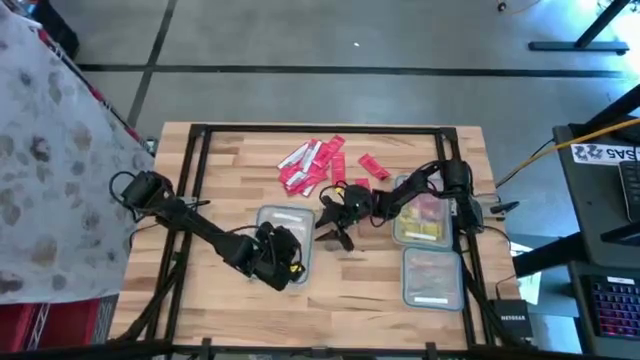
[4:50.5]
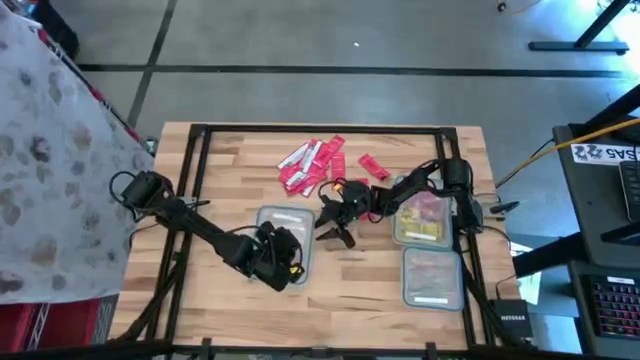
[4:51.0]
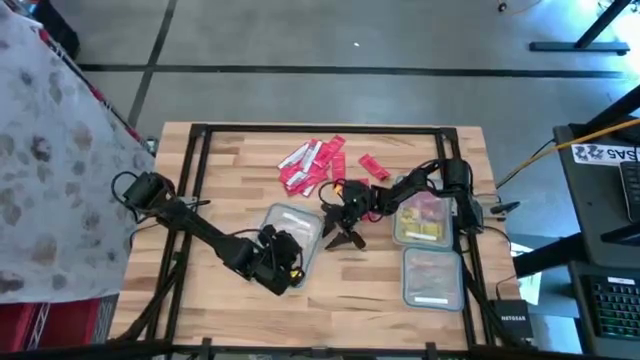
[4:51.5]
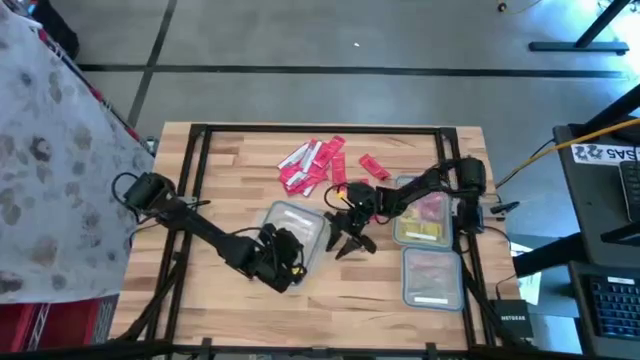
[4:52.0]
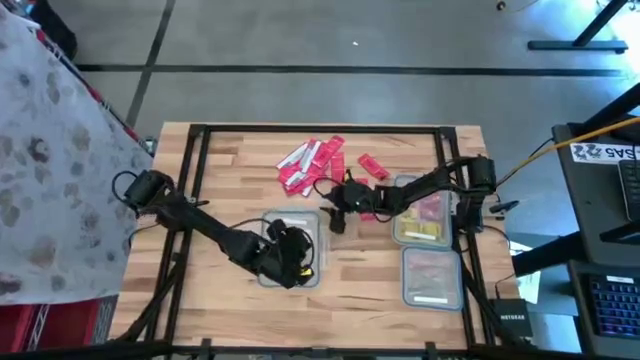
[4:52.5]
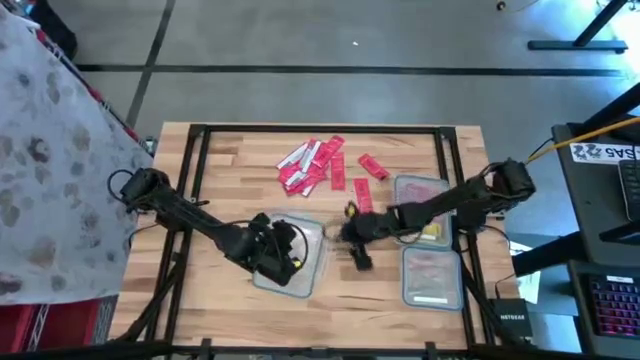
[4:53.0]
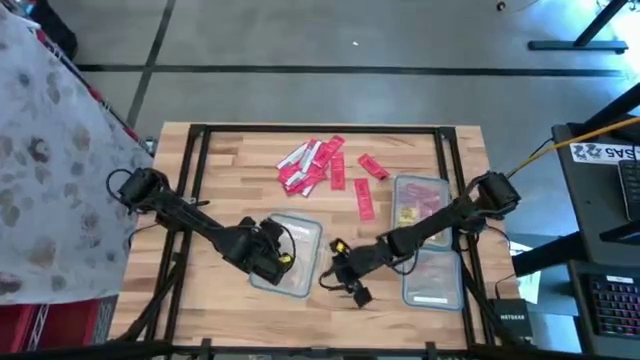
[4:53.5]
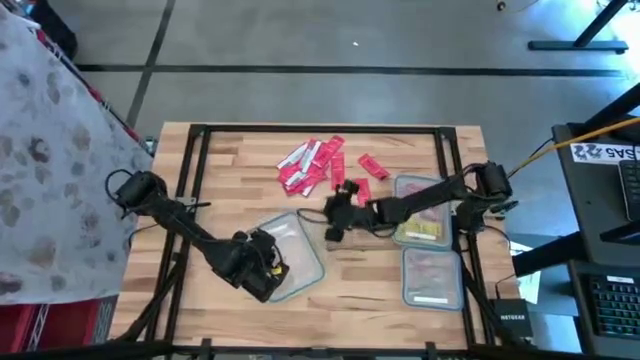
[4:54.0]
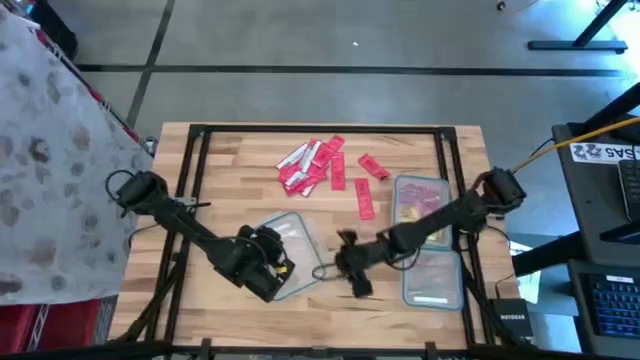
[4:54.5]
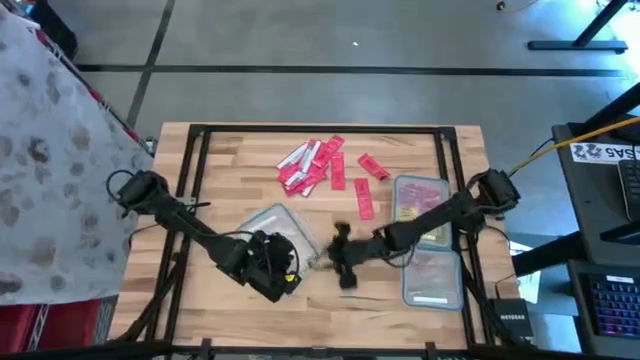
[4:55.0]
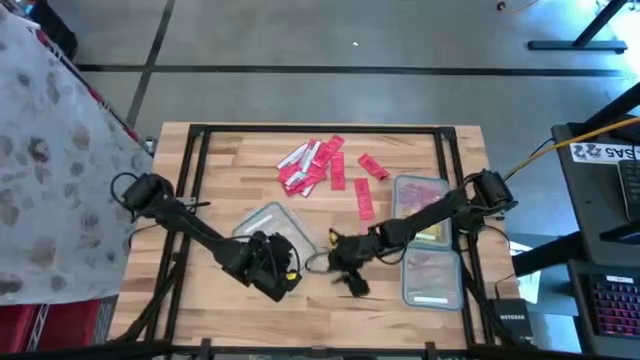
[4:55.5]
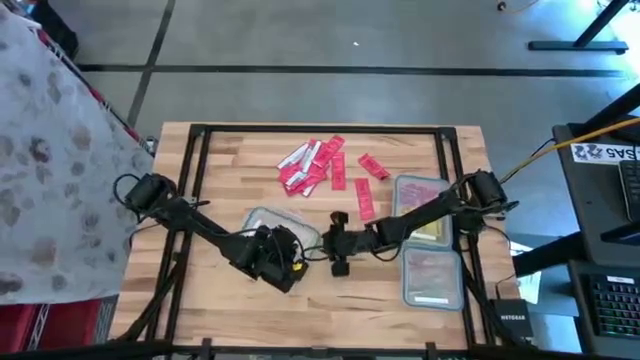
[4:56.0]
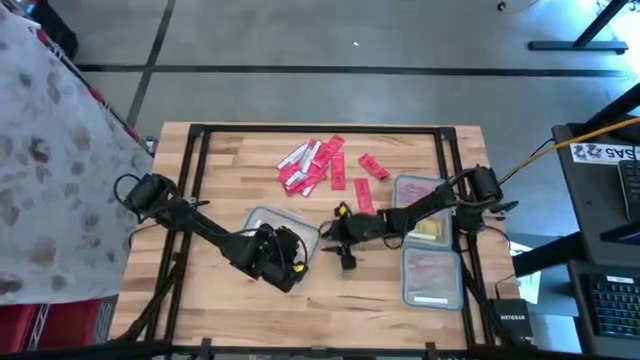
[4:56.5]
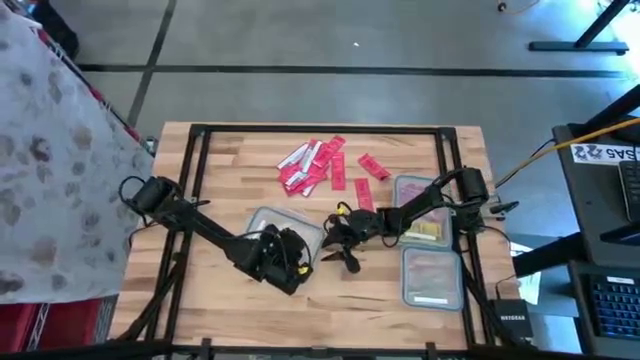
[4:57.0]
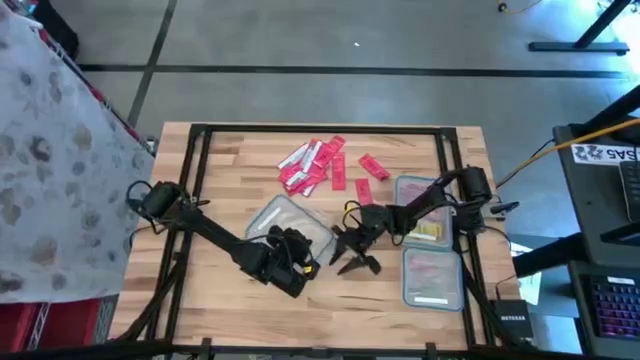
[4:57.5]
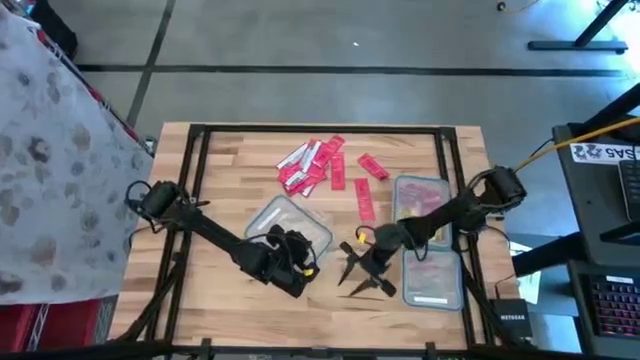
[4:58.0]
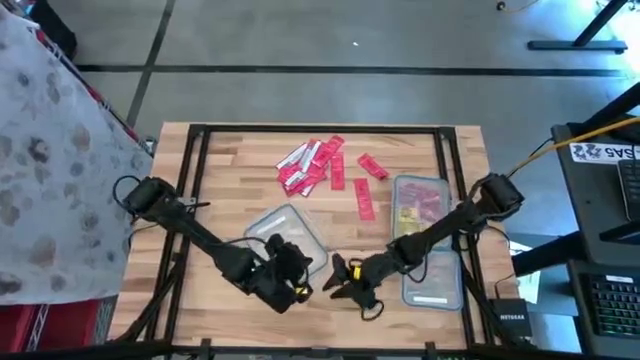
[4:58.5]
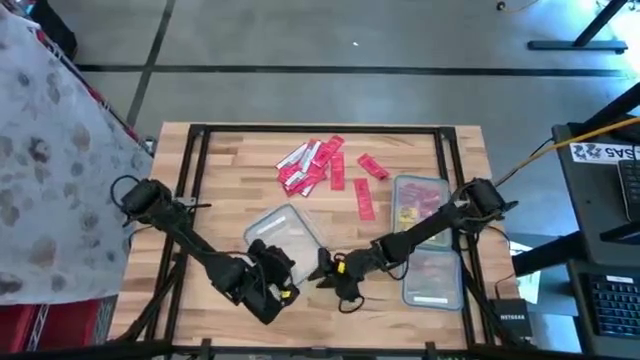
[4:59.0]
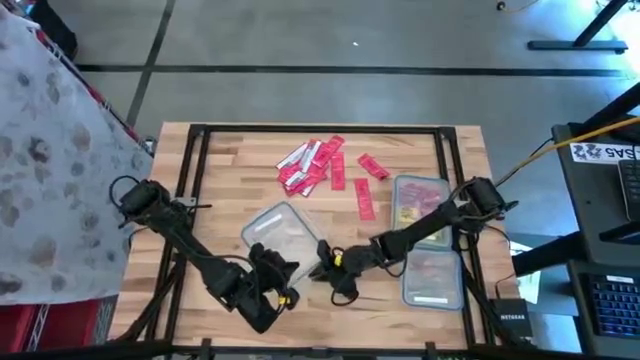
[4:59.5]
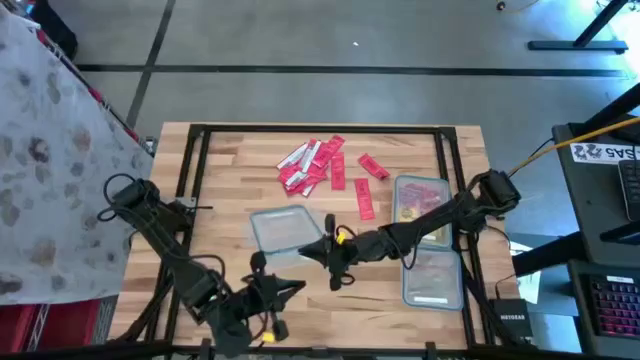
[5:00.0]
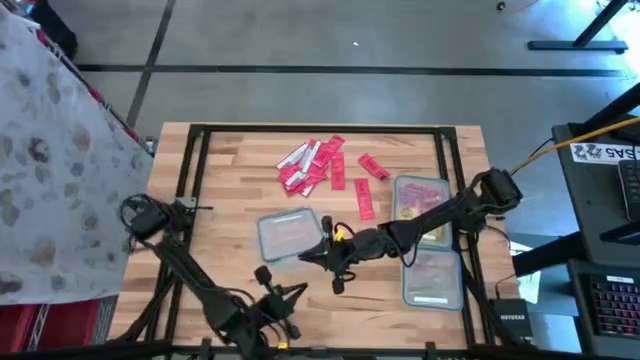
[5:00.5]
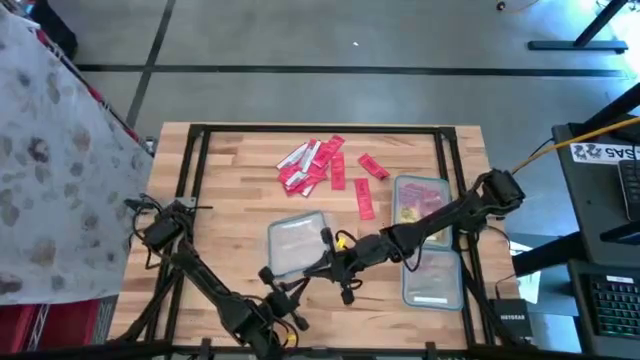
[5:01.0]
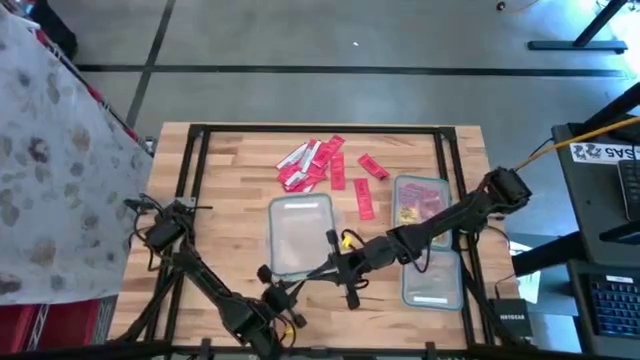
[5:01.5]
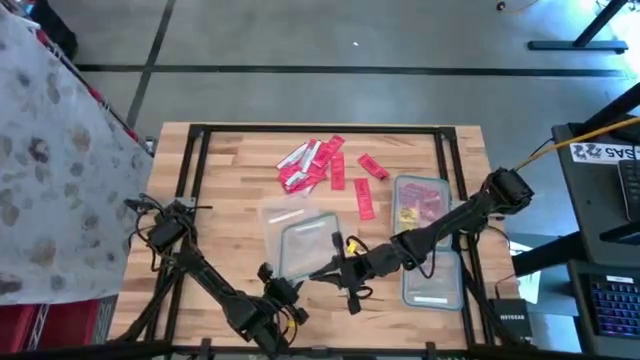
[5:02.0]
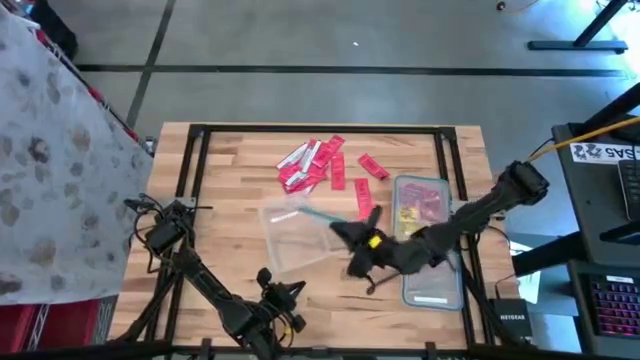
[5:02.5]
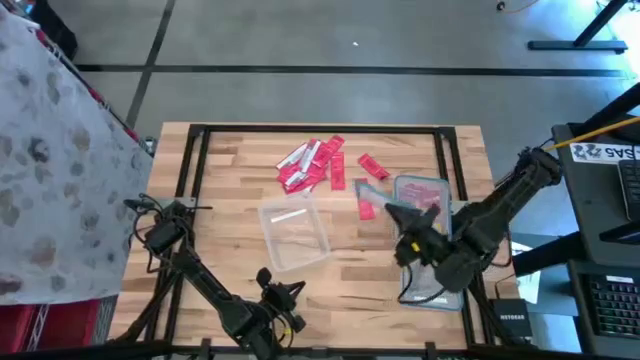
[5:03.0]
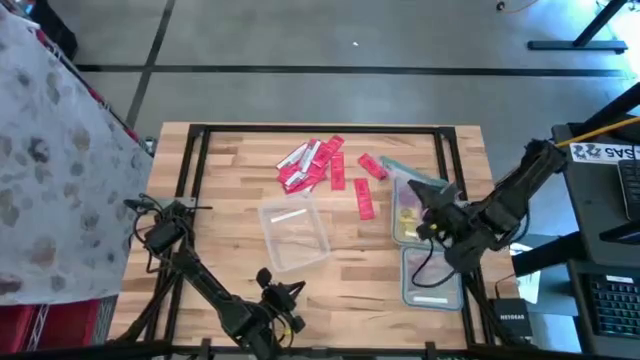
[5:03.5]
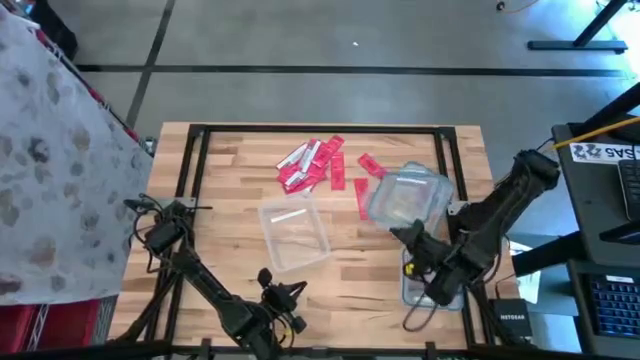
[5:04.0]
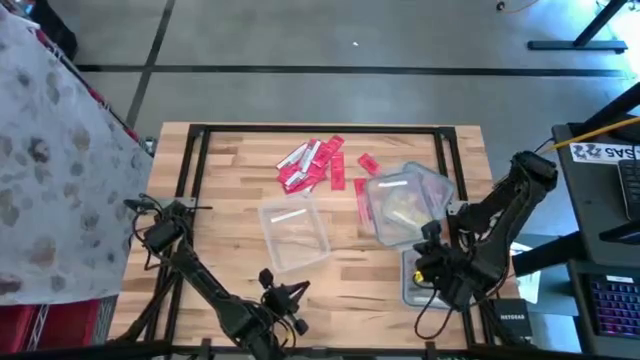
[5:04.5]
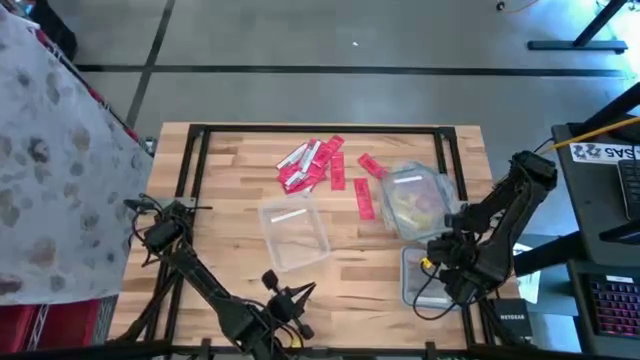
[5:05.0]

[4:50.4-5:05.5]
Task: Sort candy
Open the left transparent bin

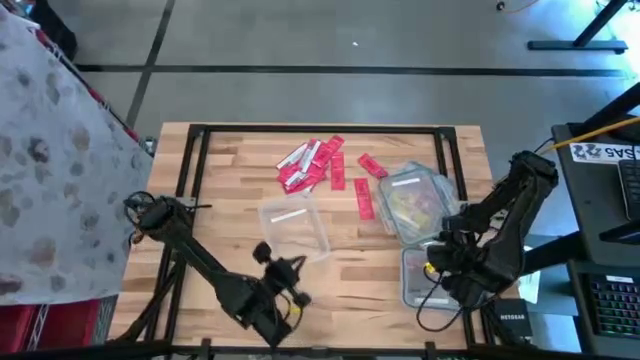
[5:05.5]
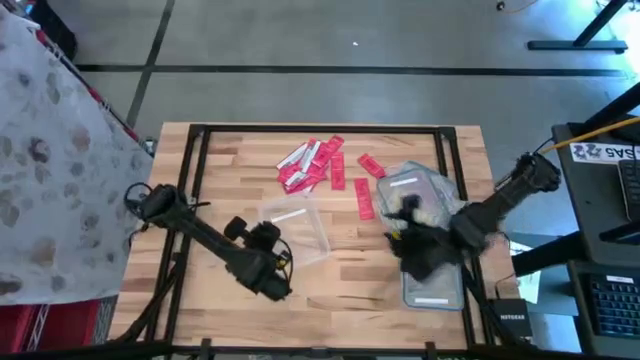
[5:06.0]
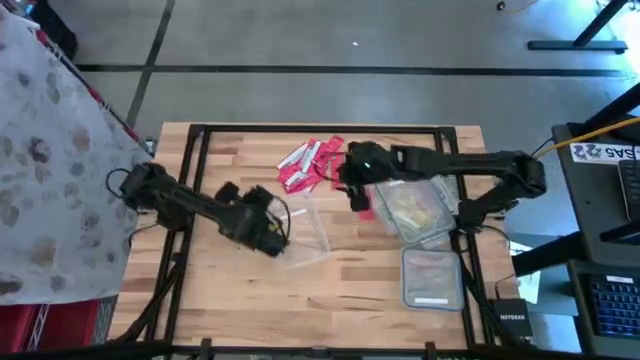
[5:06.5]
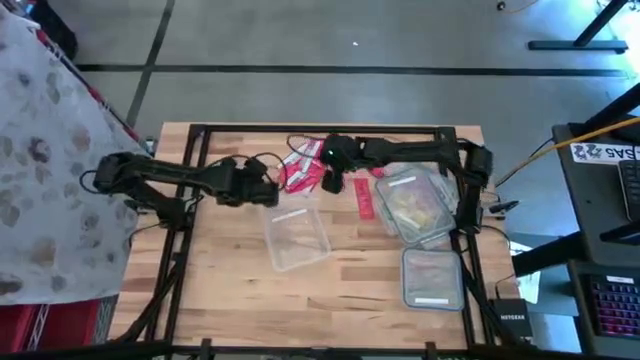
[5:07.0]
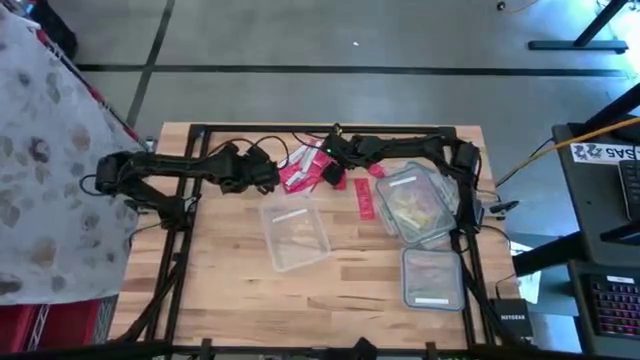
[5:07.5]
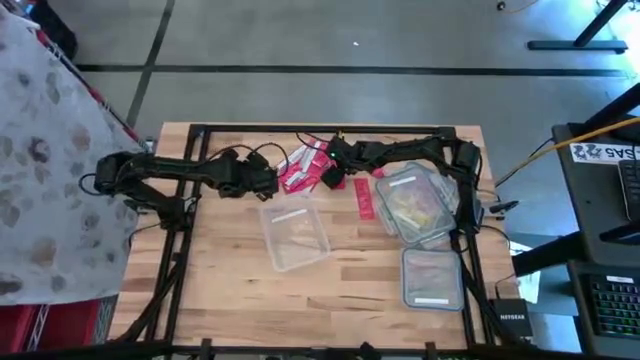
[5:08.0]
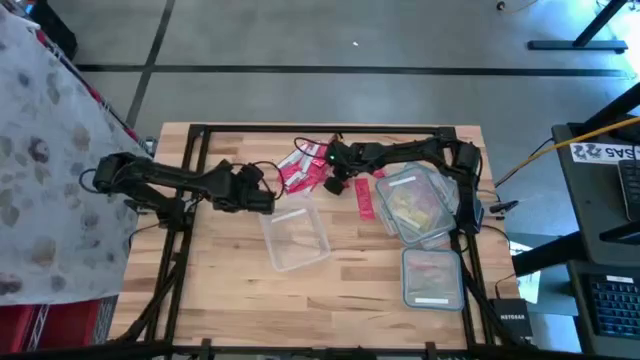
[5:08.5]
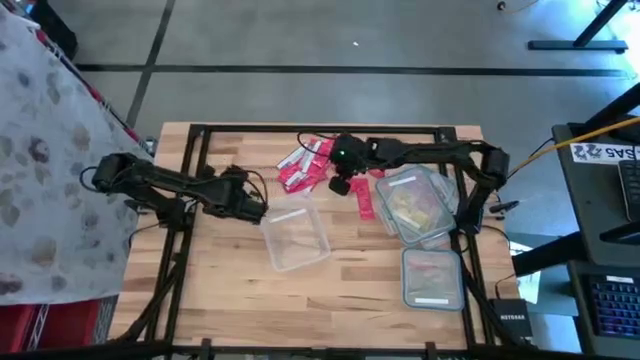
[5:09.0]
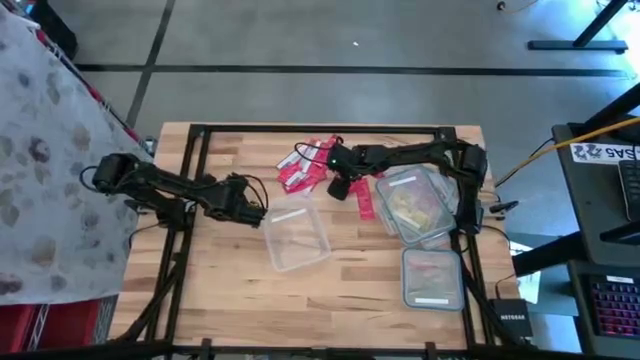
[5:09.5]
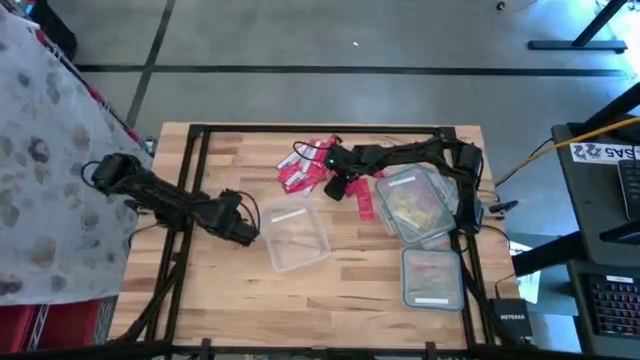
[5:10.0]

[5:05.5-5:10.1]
Put the pink candy strip into the left transparent bin

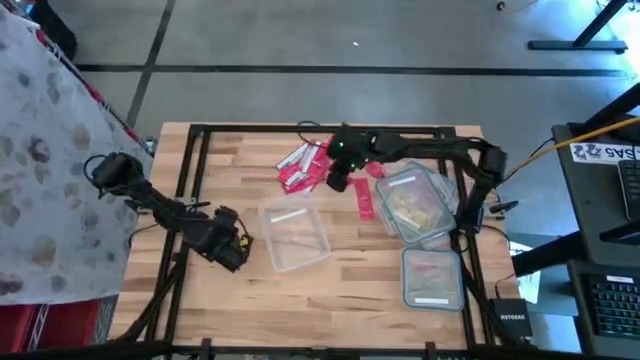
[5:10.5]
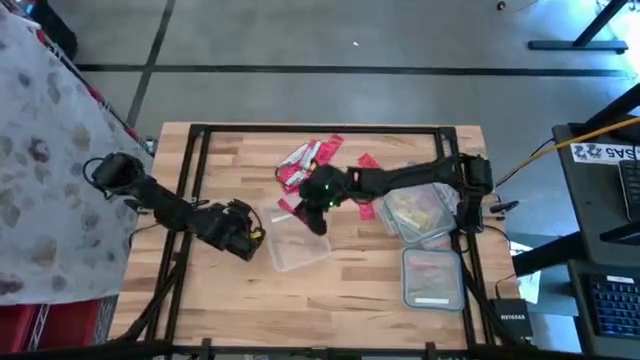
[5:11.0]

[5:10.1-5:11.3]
Put the pink candy strip into the left transparent bin

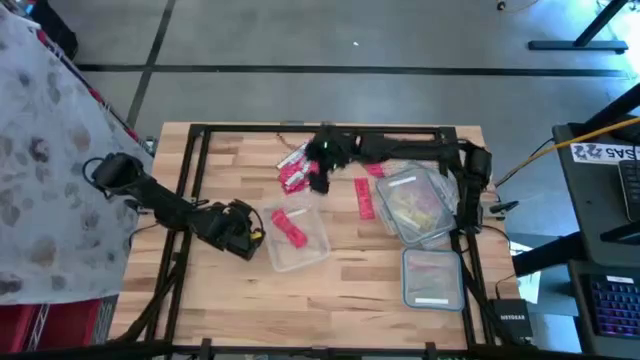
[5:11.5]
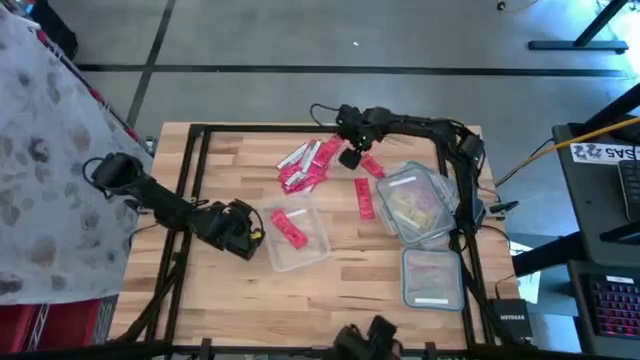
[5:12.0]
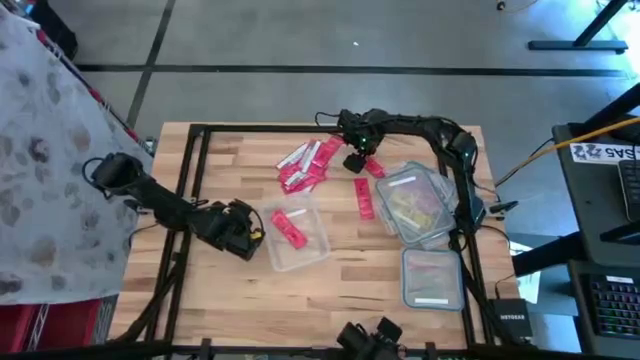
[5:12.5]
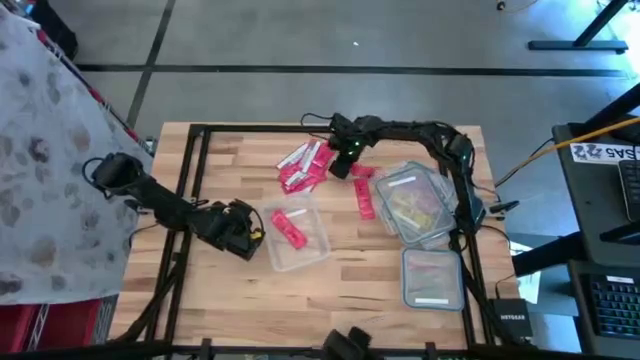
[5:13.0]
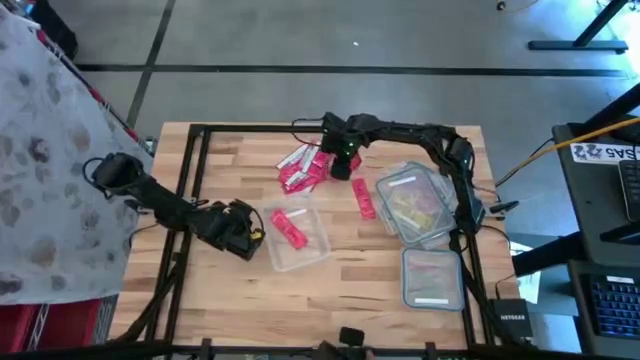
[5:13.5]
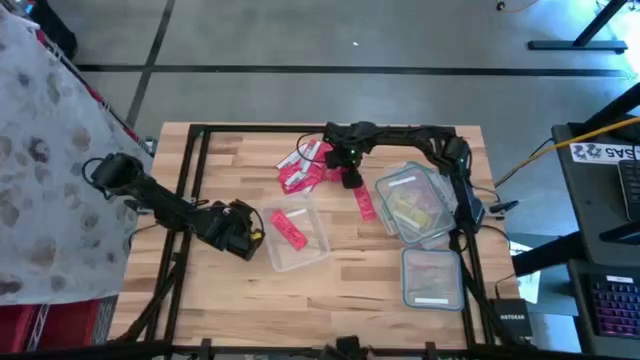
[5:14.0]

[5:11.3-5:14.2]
Put the pink candy strip into the left transparent bin
